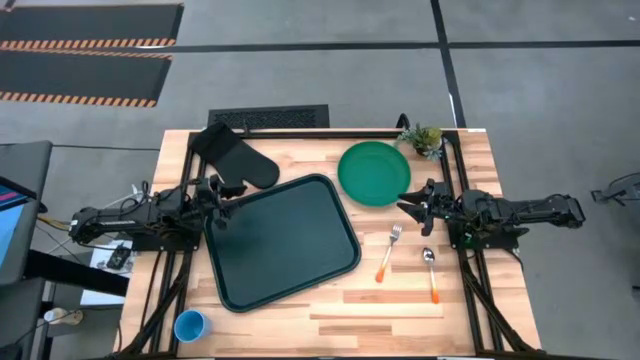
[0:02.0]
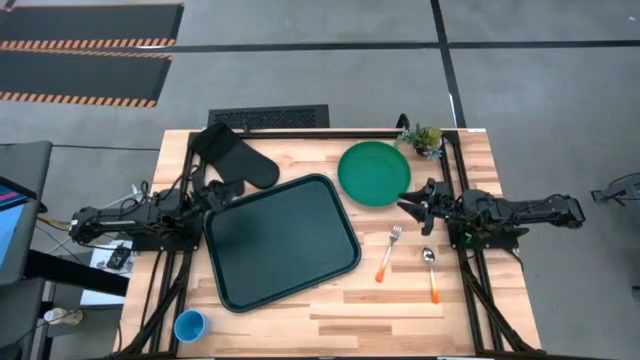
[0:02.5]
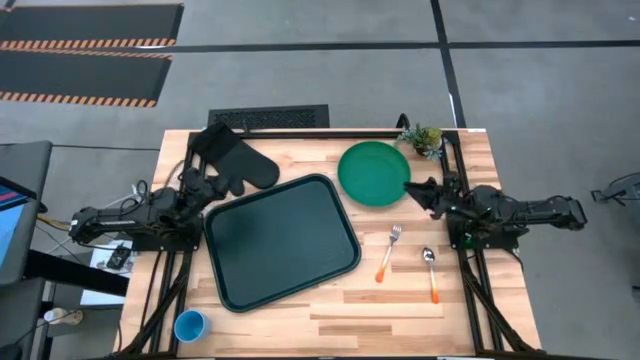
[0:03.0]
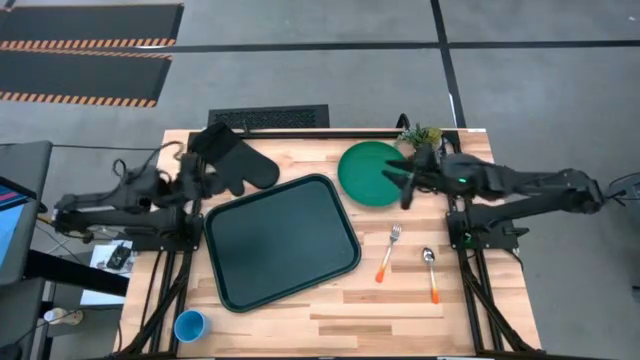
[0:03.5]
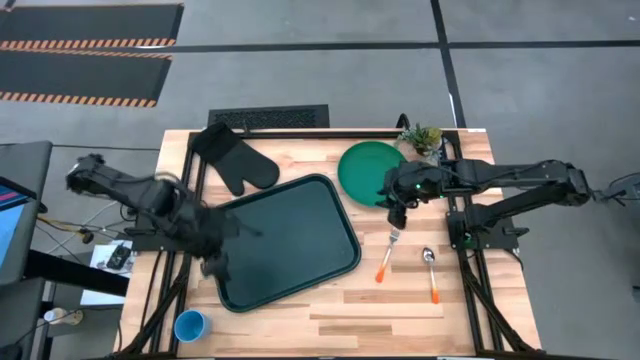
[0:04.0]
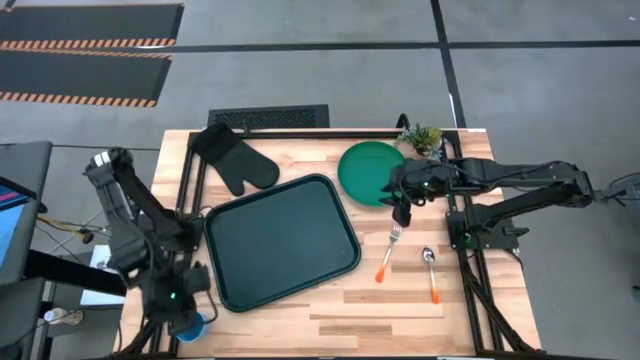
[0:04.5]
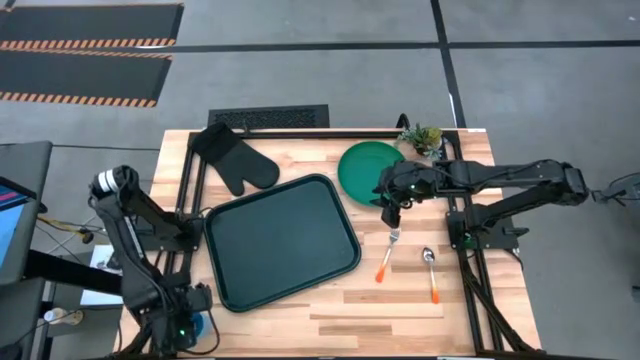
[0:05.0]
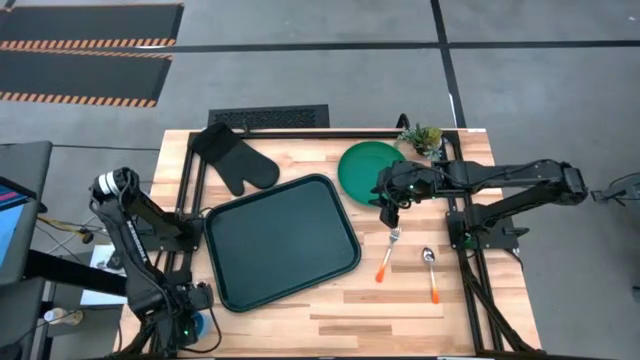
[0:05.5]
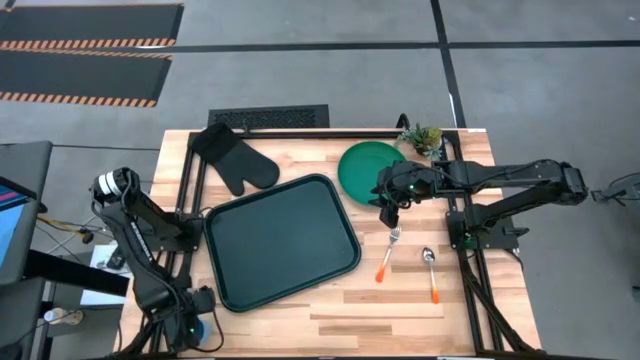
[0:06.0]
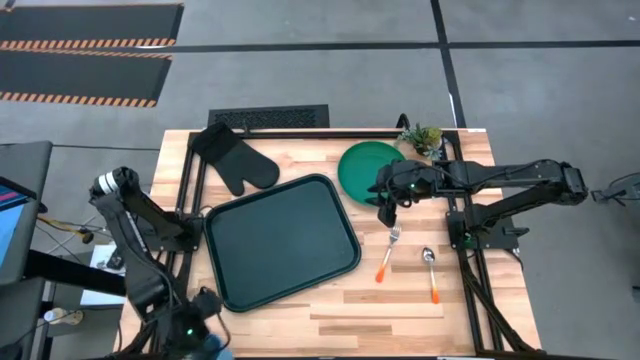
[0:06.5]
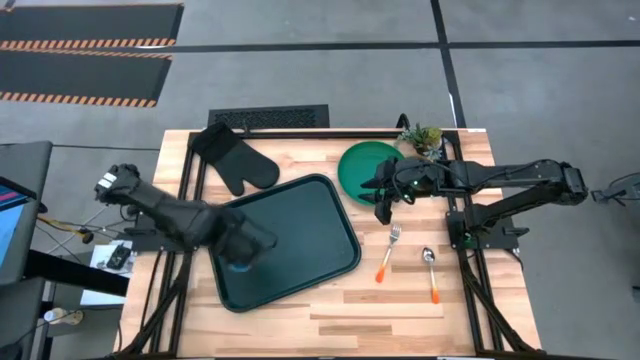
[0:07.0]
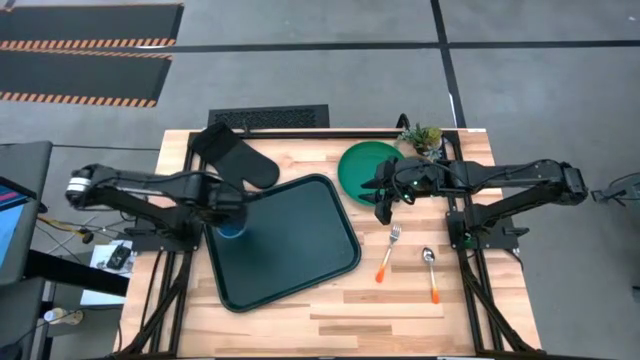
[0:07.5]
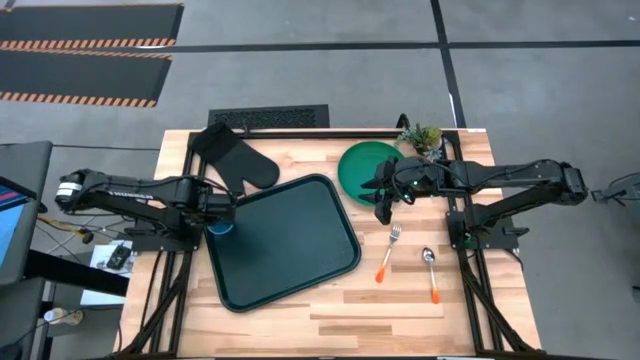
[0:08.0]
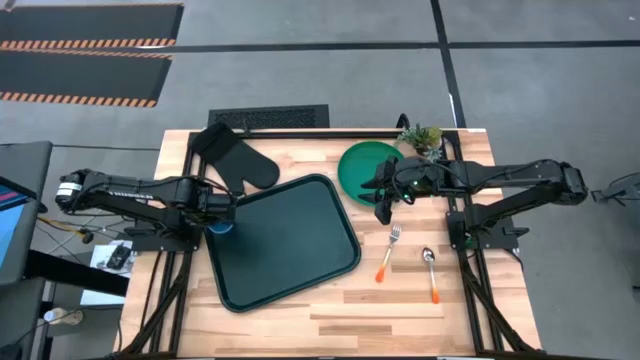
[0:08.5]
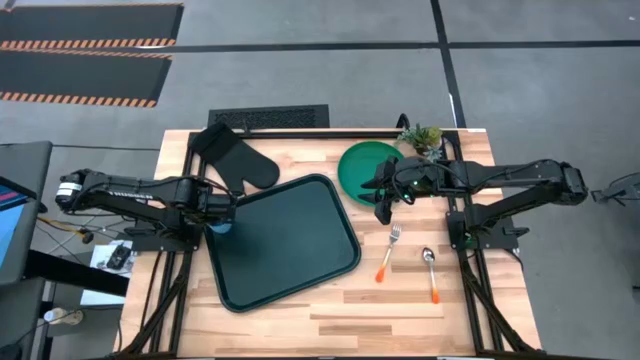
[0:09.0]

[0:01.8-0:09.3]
Task: Pick and place plate/cup/fork/spoon on tray
Put the blue cup on the top left of the black tray

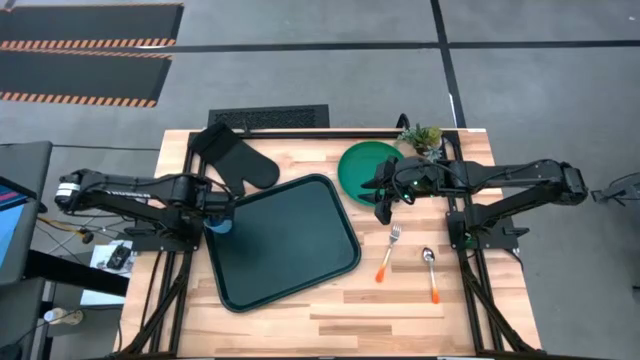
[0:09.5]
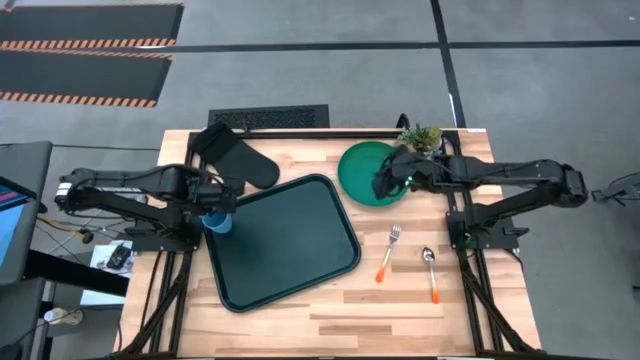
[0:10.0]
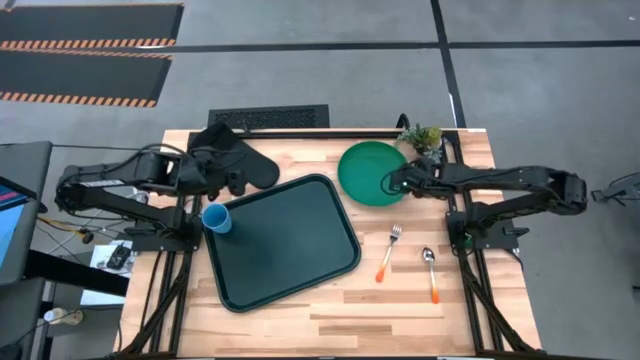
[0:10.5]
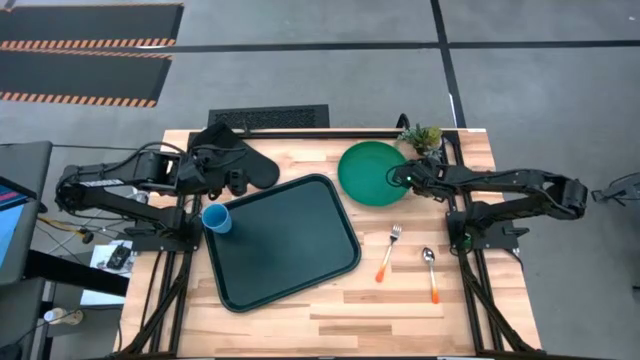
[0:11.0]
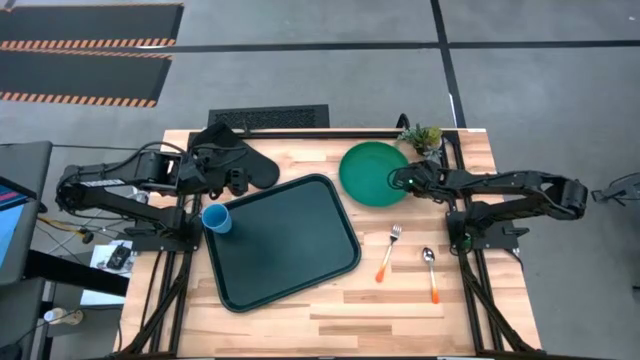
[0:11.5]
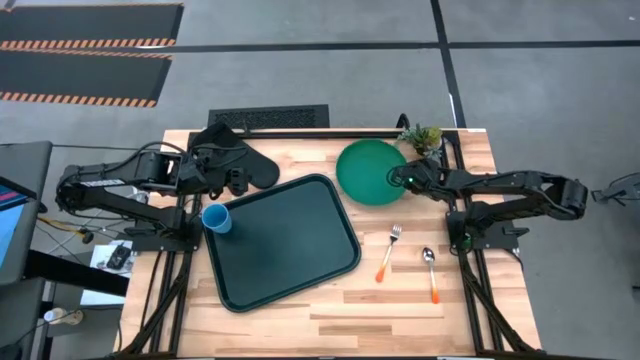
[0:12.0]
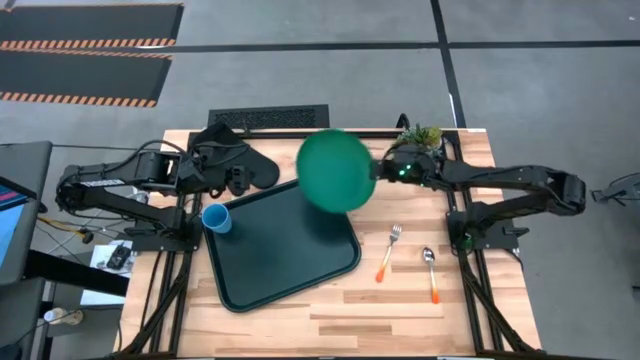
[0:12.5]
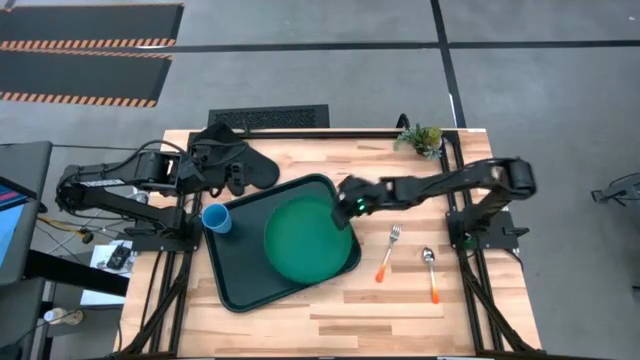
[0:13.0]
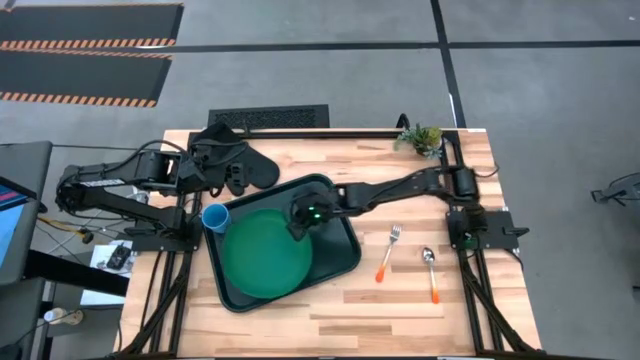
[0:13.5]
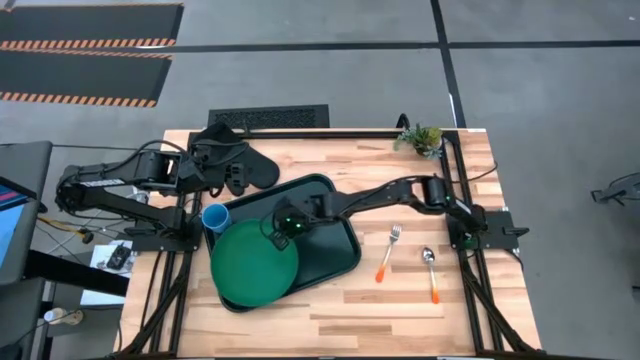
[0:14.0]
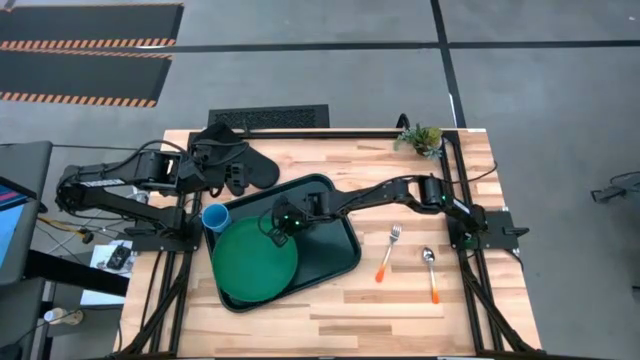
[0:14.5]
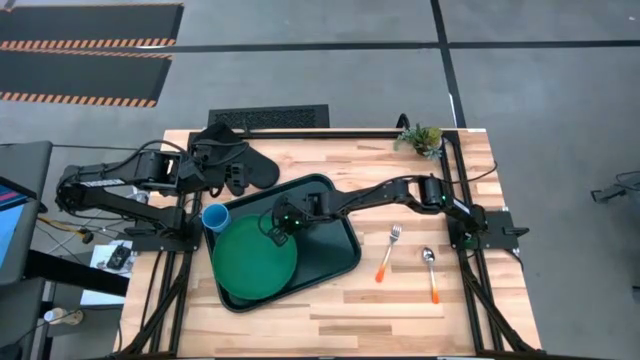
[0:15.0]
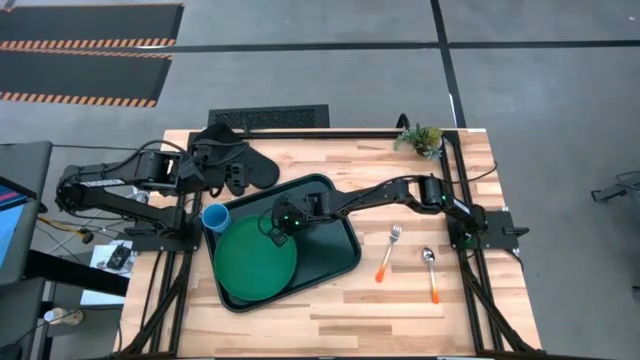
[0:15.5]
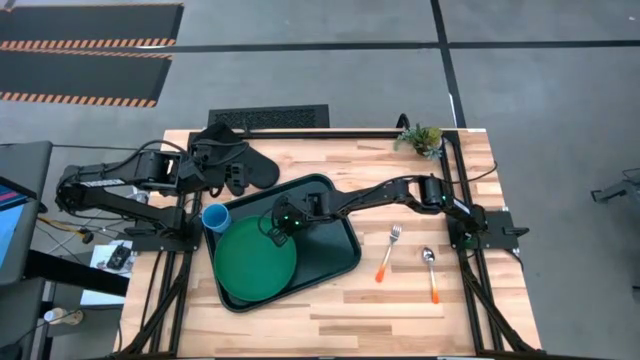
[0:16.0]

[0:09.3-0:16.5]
Put the green plate on the black tray to the bottom of the blue cup

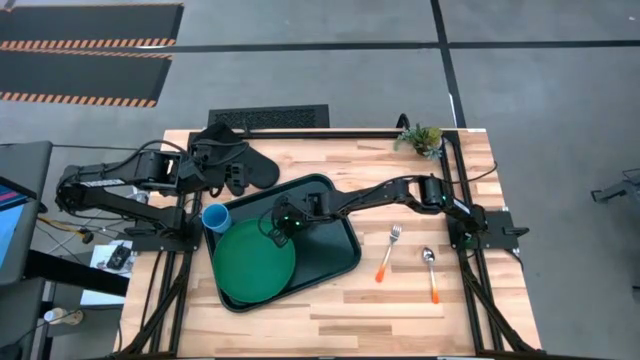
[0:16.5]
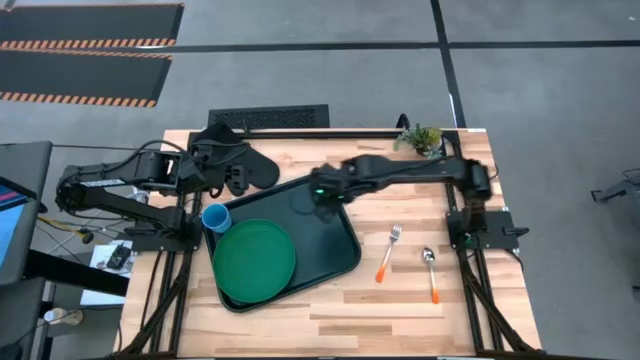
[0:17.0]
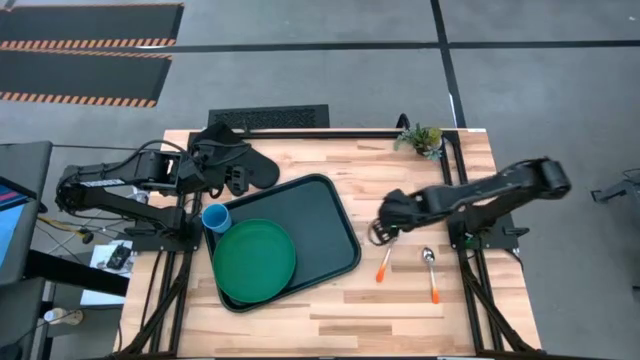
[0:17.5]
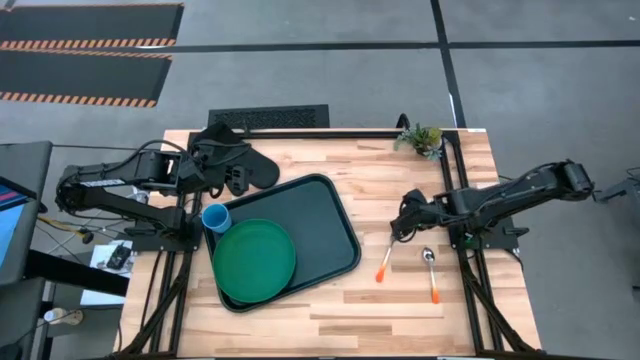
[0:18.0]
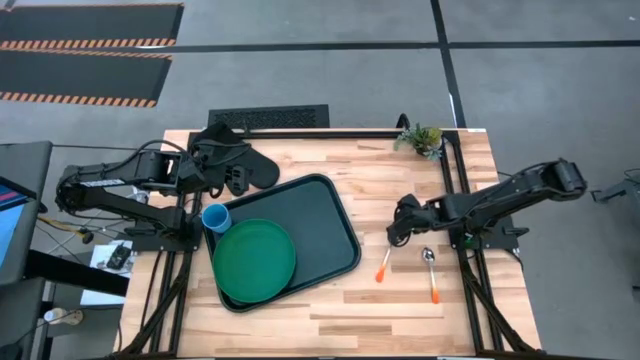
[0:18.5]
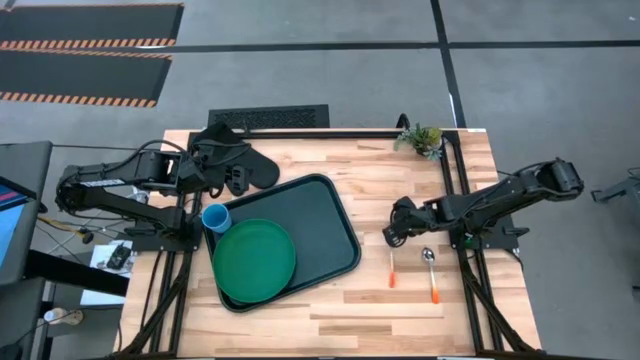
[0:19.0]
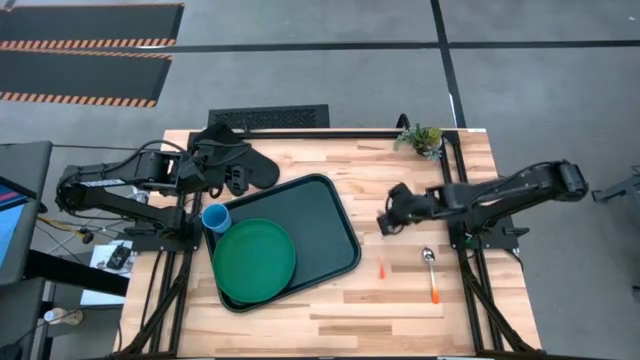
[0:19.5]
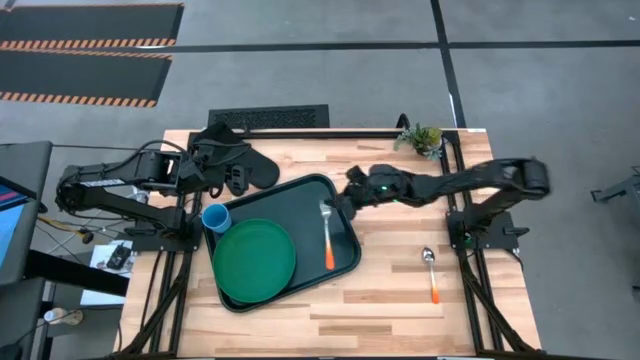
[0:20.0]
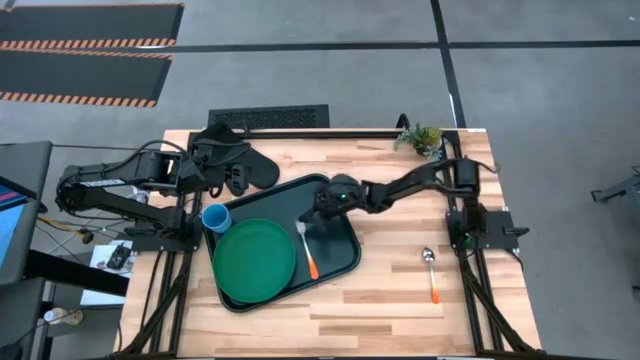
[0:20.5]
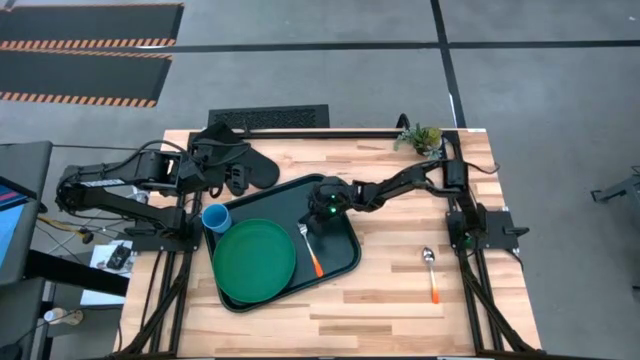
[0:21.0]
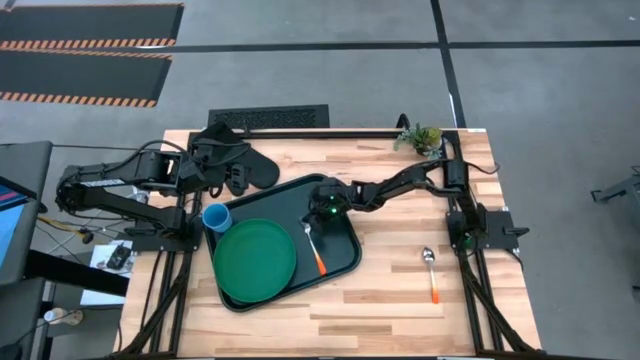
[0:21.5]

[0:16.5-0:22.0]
Put the orange fork on the black tray to the right of the green plate

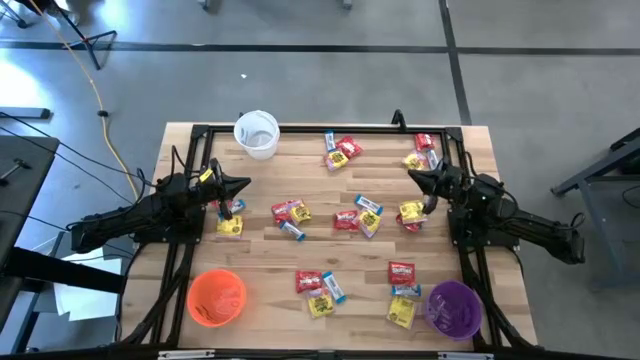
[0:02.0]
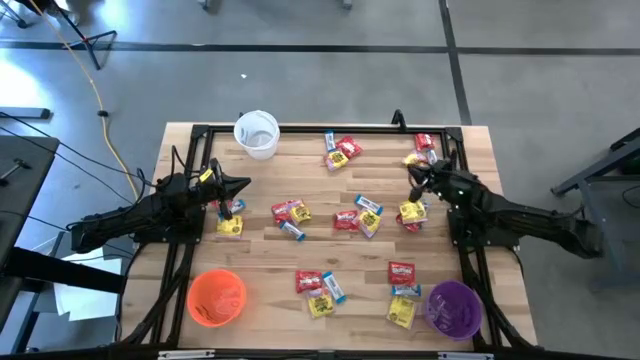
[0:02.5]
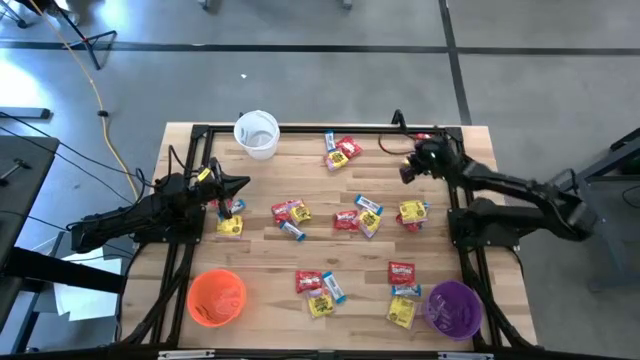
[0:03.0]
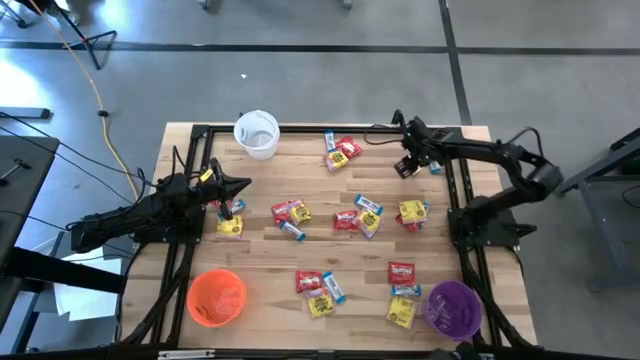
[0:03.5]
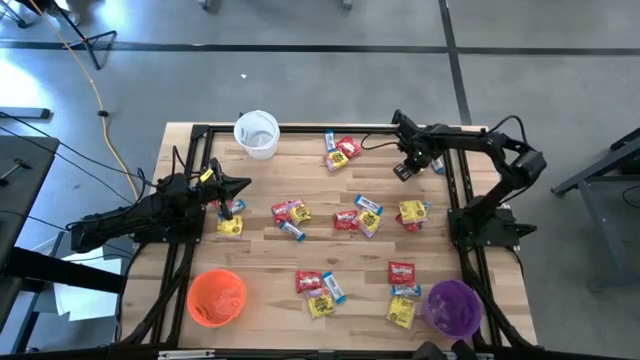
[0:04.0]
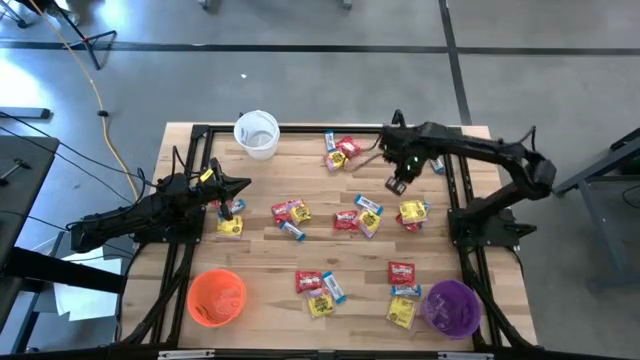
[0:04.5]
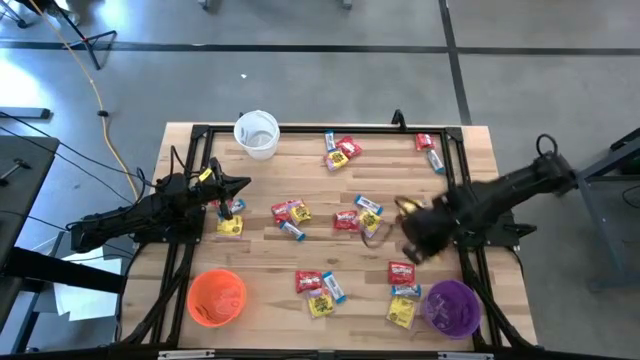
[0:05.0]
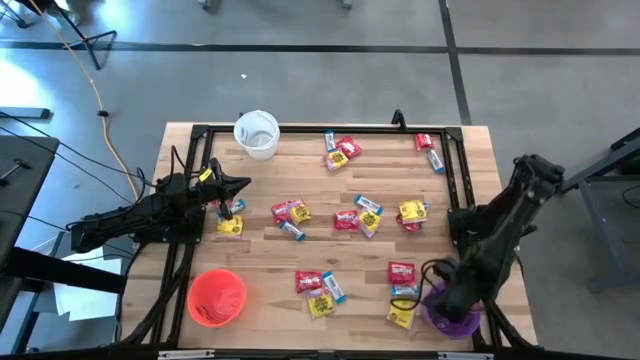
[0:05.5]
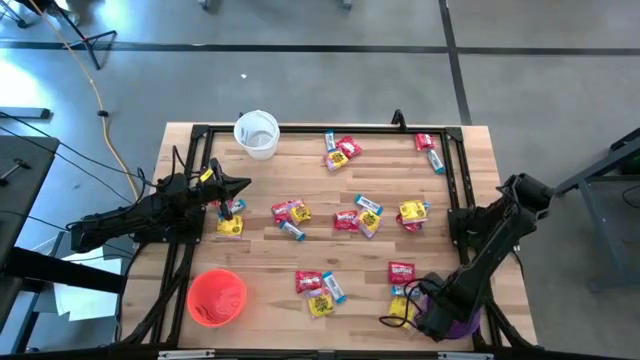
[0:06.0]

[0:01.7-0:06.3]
Task: Sort candy
Put the yellow candy into the purple bucket
